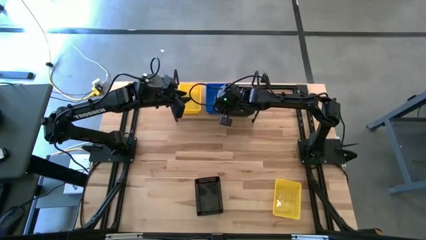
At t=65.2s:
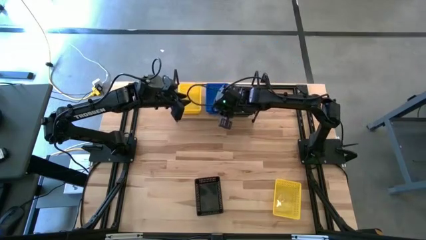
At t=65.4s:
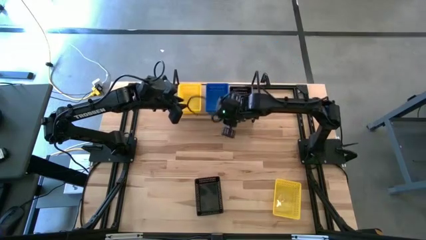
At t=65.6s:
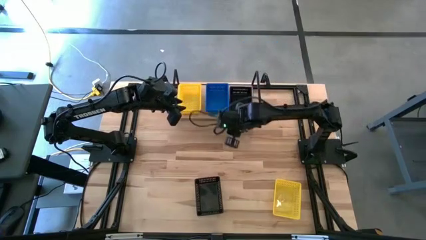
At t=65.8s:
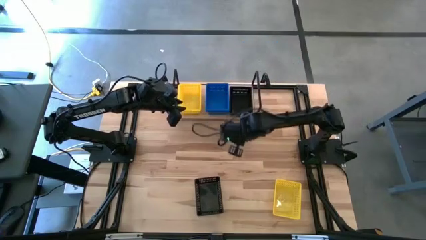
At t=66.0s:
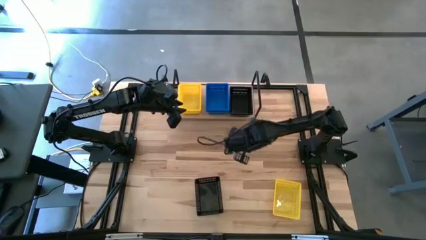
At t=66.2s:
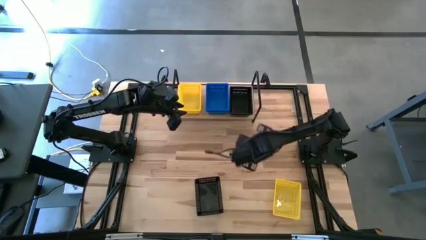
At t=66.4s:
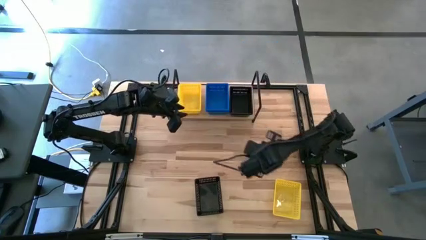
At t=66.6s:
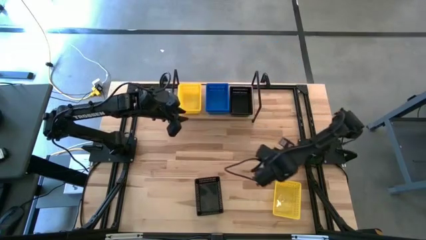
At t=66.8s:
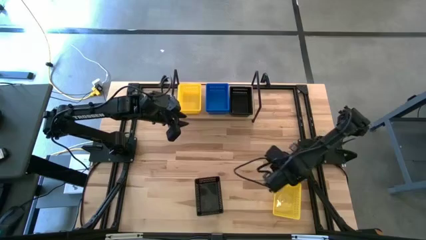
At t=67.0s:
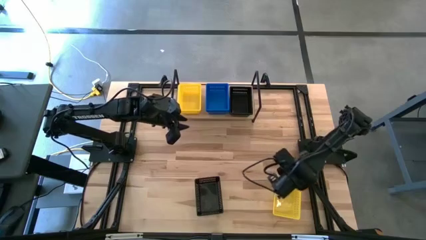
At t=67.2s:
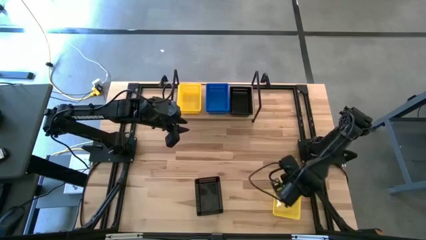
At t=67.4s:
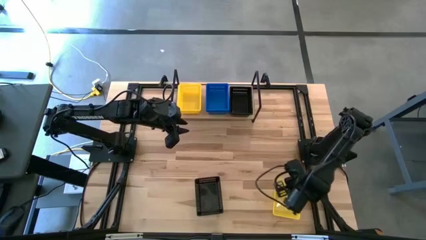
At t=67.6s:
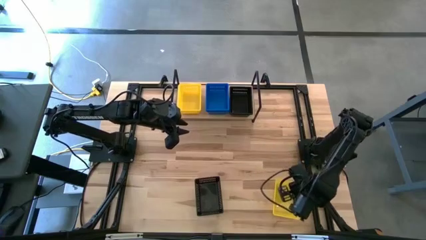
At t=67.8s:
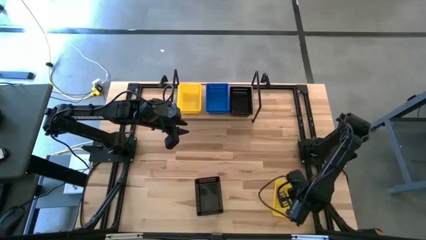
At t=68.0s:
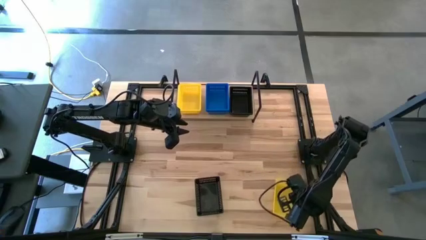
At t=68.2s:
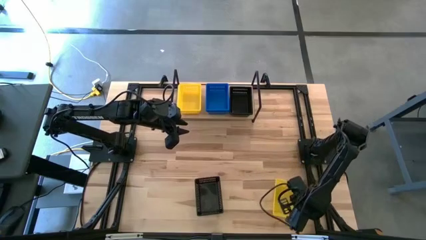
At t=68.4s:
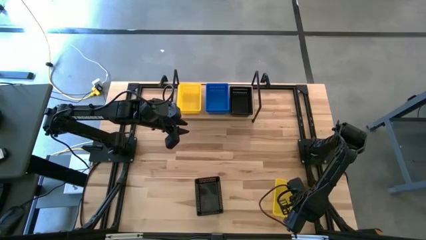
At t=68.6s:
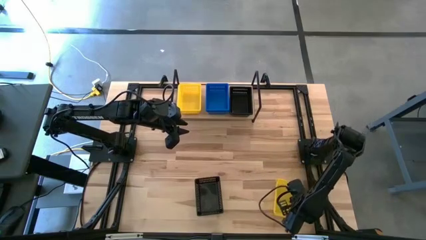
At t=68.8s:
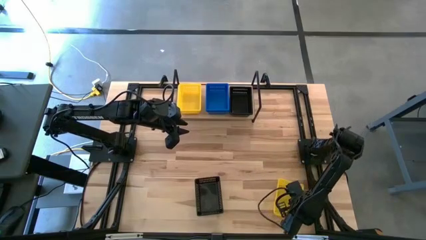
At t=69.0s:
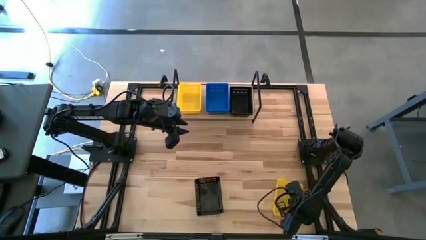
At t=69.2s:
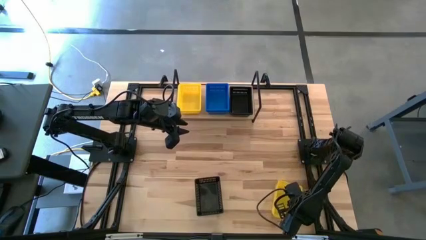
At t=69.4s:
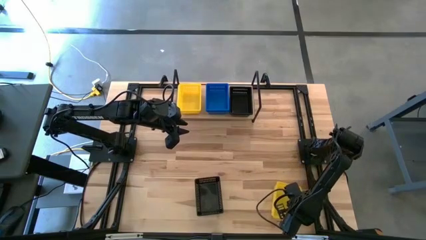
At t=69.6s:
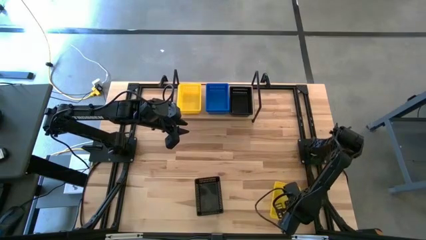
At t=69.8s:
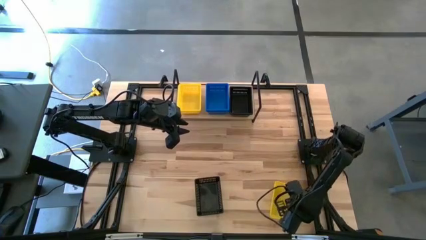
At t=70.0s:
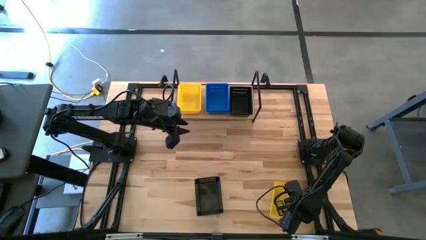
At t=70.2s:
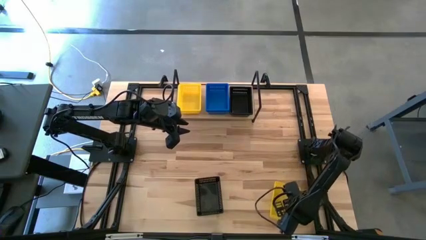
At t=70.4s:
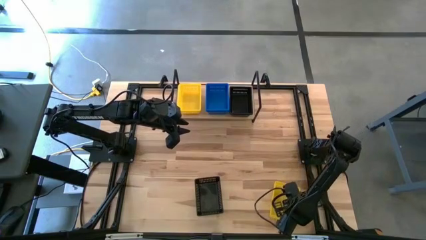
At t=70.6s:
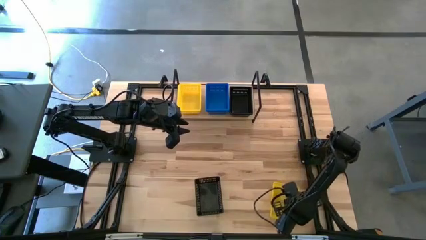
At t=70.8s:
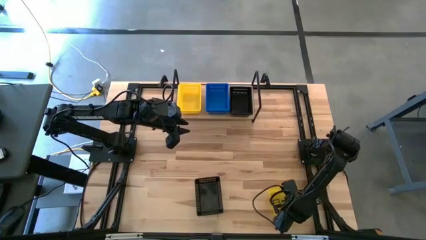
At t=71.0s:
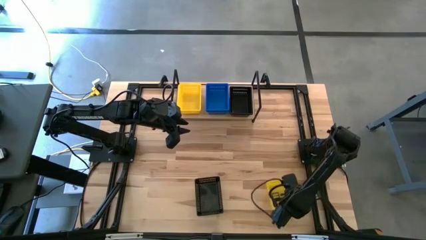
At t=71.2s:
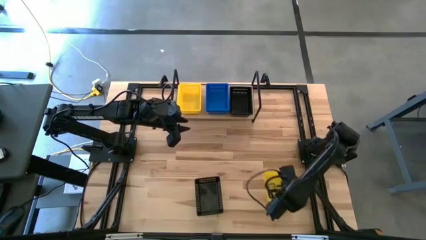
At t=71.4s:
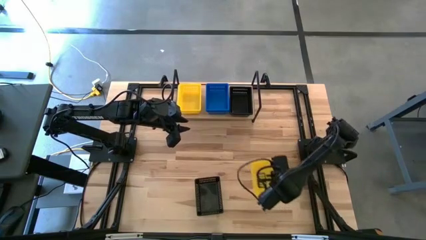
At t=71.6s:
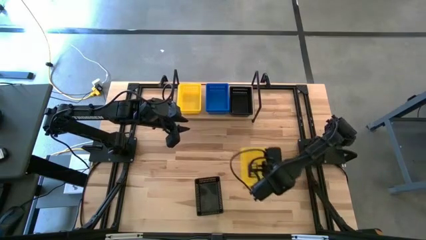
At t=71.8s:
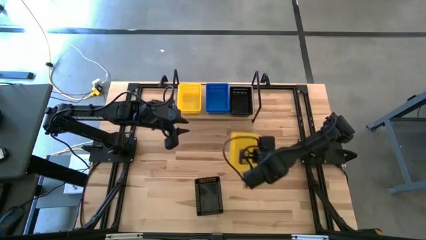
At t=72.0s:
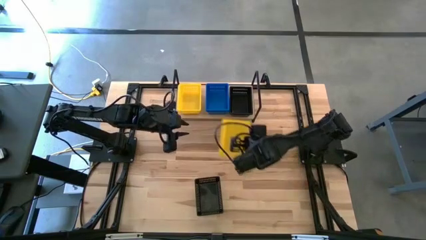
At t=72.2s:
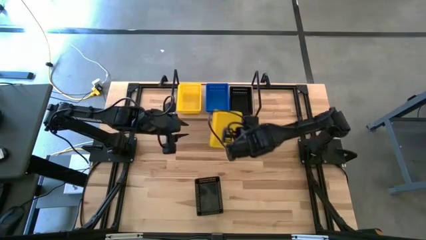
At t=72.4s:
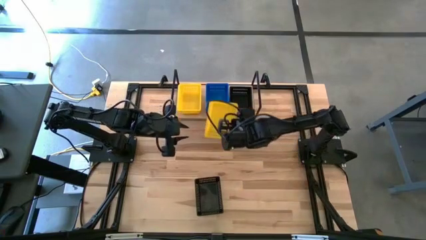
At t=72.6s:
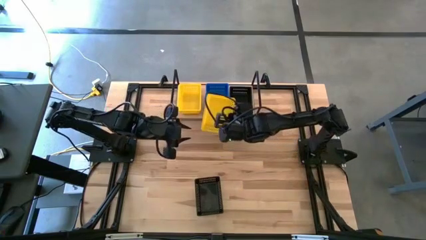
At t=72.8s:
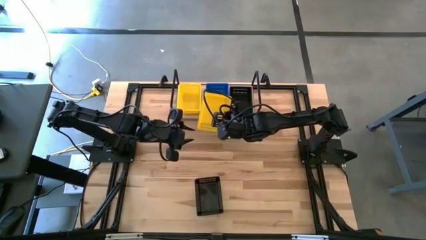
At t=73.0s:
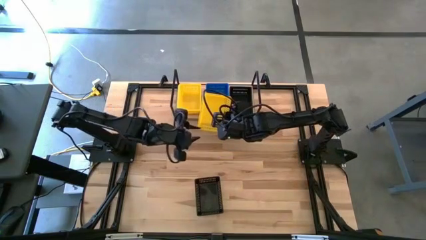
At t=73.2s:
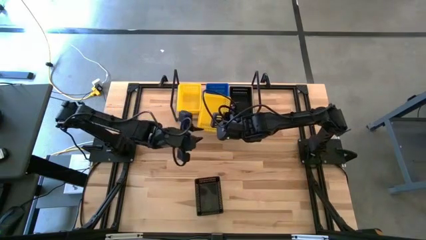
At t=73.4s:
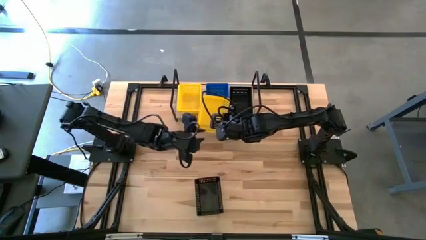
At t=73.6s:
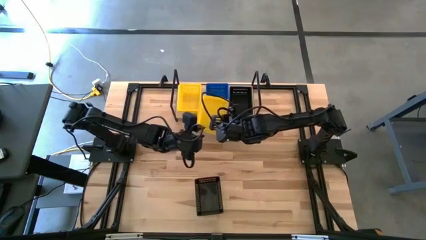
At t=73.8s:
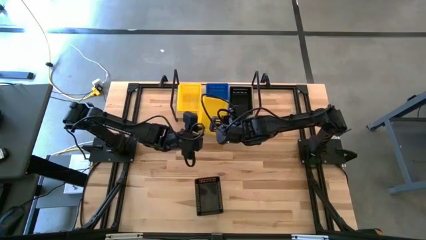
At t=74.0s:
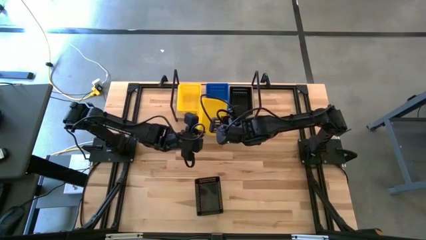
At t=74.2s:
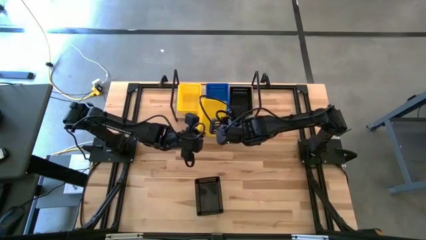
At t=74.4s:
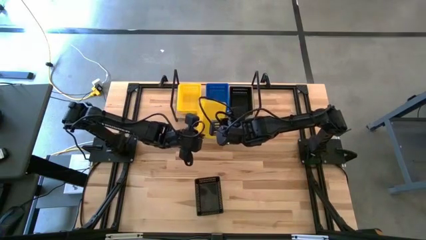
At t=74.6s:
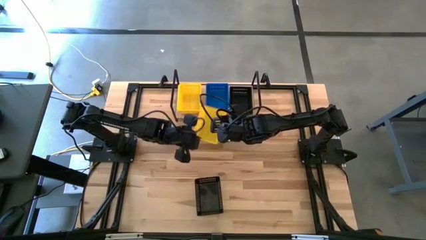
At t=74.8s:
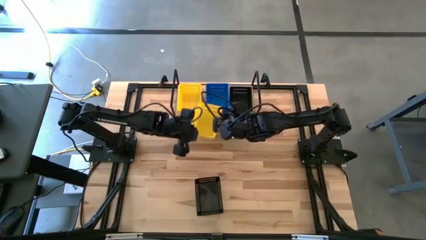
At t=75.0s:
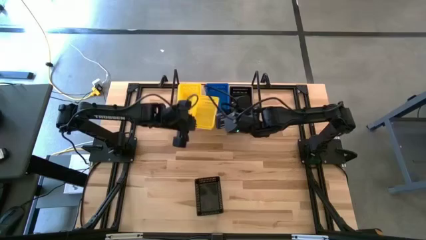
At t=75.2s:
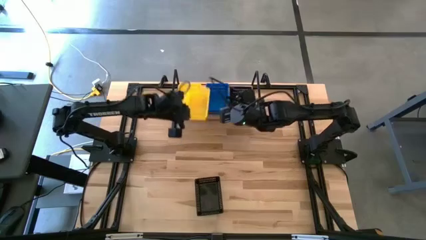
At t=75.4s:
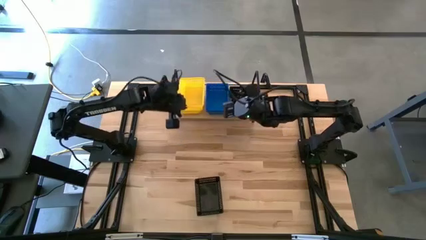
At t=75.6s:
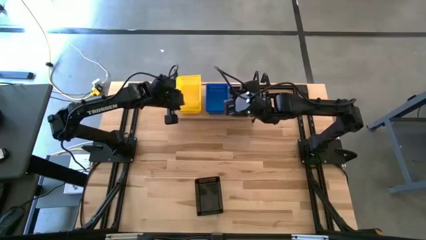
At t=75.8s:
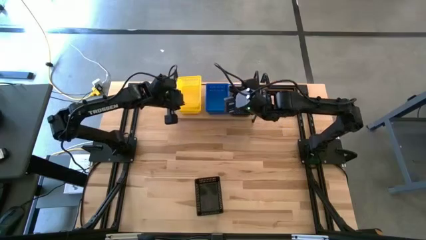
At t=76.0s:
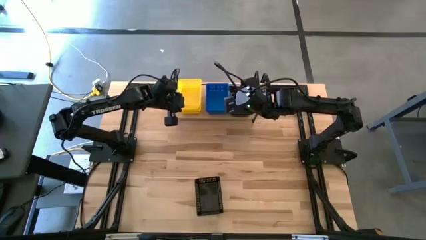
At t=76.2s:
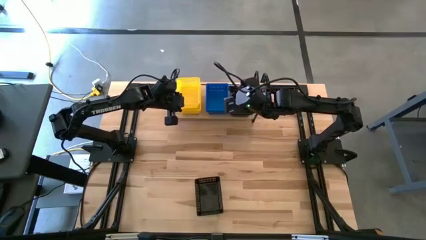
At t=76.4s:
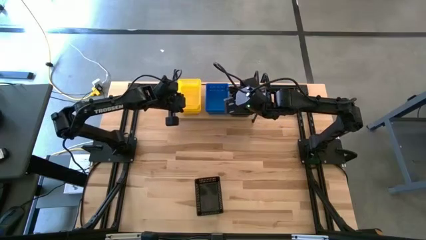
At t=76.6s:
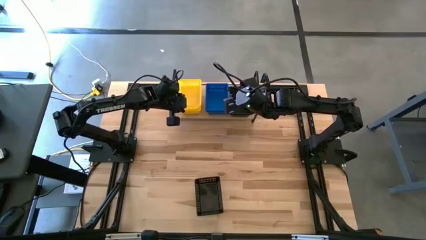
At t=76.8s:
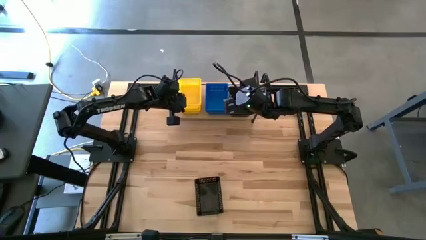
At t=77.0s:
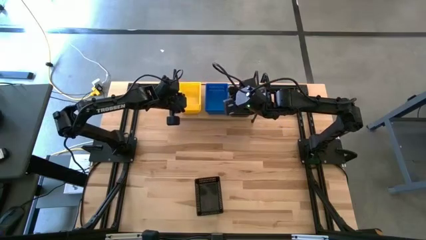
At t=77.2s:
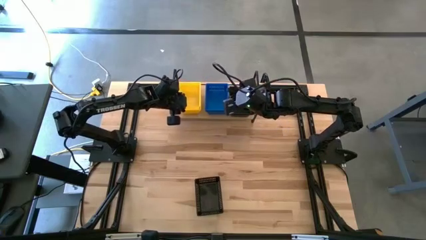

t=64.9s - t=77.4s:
Task: Stack baskets on shelf by color
Stack the yellow bin on top of the yellow bin on the shelf
